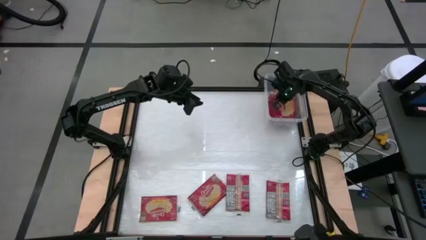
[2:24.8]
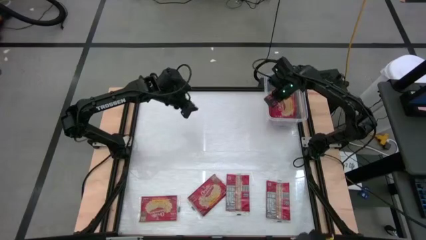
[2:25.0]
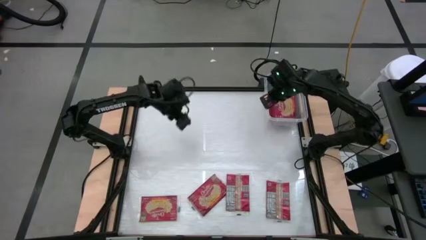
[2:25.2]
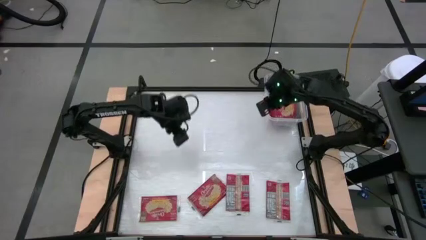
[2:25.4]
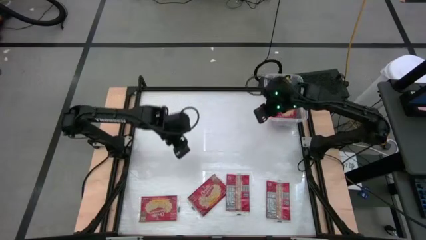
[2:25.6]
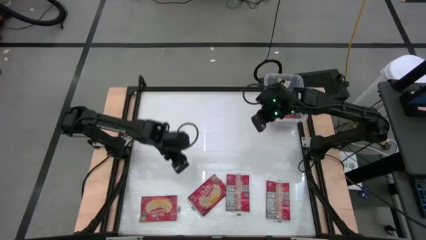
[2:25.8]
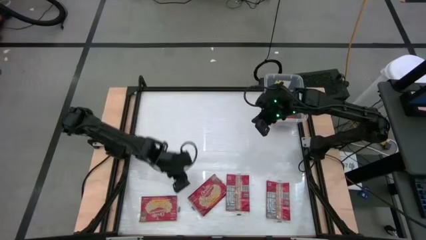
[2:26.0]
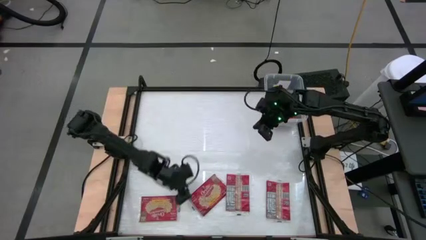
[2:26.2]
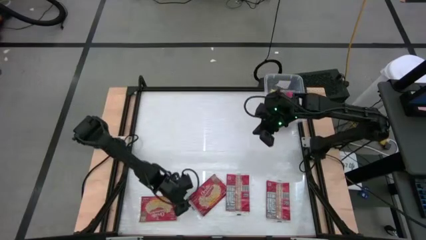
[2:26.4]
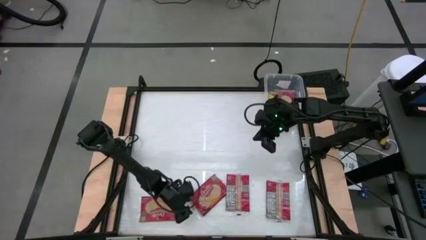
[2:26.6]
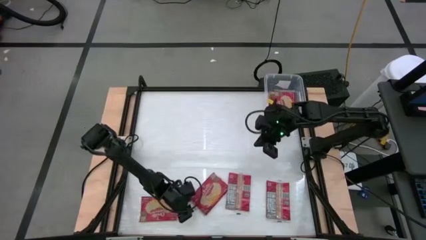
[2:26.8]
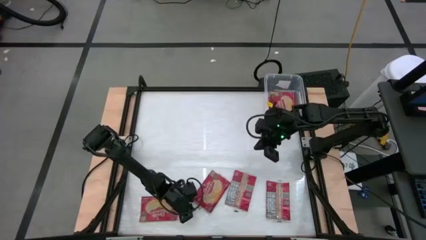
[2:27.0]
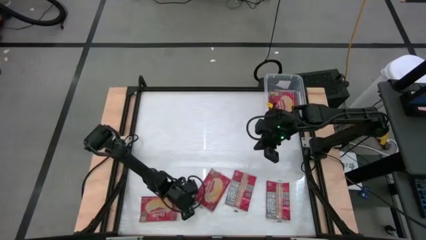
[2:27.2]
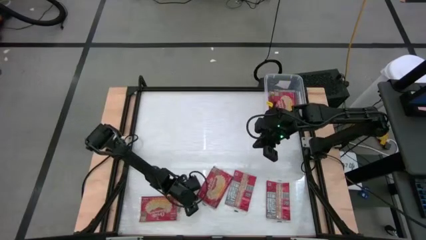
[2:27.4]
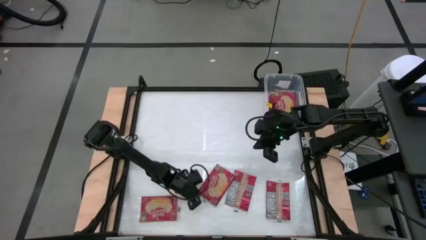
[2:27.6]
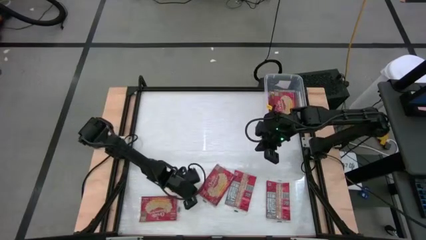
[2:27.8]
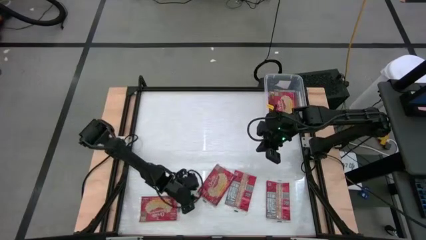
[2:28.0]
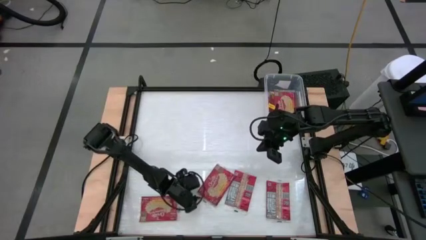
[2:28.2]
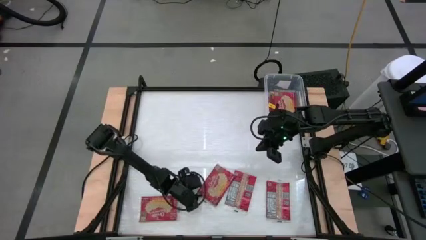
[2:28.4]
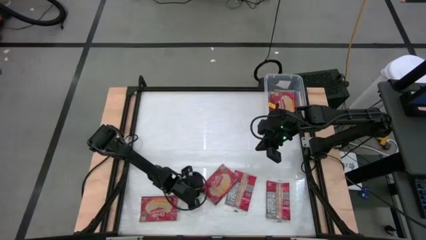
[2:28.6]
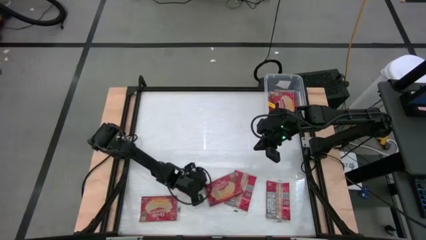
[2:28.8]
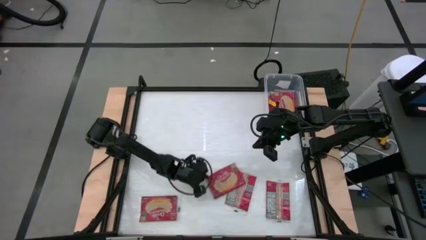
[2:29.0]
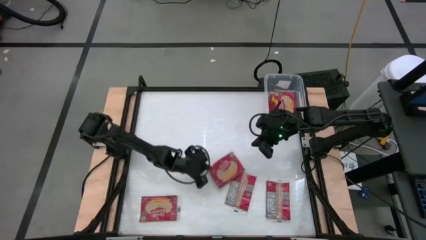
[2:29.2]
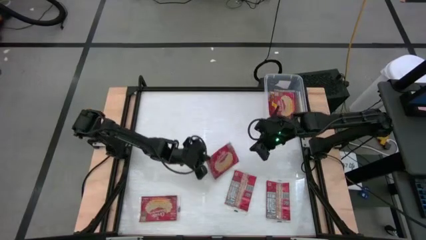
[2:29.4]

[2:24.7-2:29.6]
Task: Sort popcorn bags into baskets
Put the red popcorn bag into the transparent container

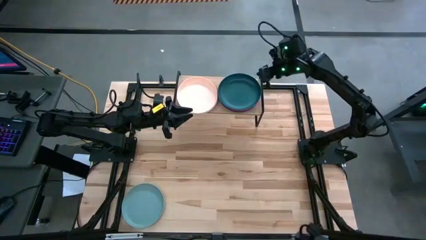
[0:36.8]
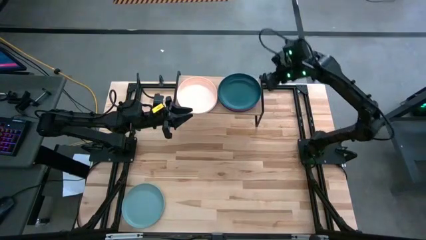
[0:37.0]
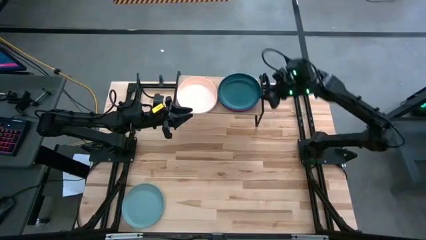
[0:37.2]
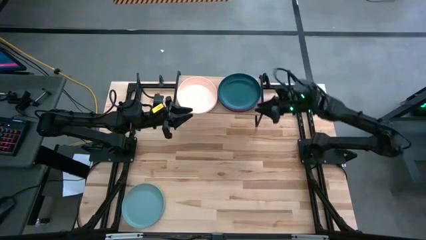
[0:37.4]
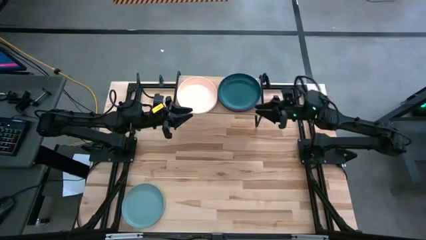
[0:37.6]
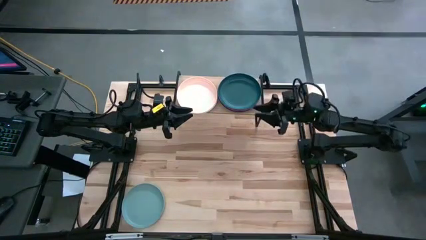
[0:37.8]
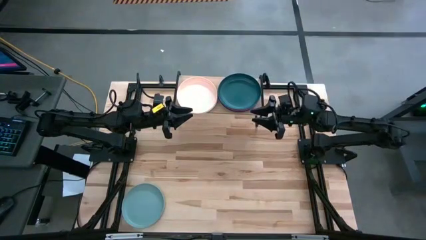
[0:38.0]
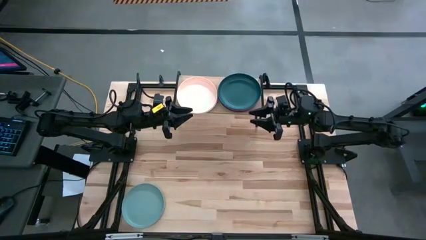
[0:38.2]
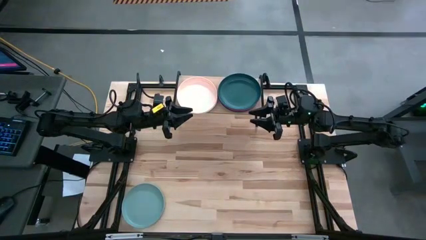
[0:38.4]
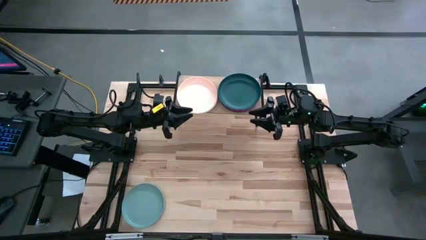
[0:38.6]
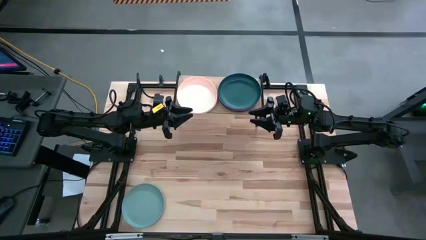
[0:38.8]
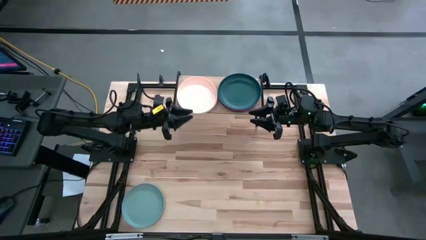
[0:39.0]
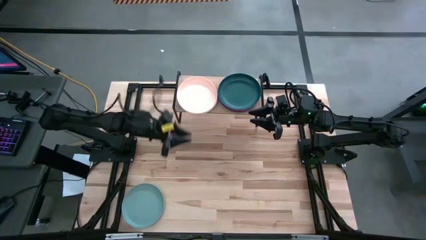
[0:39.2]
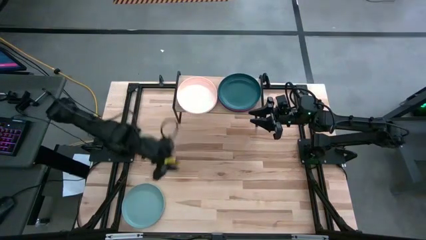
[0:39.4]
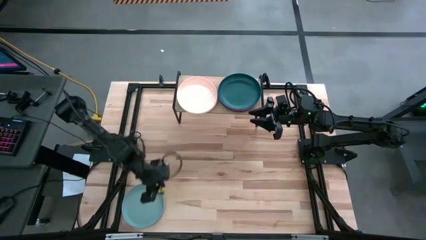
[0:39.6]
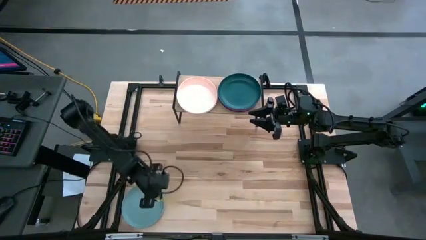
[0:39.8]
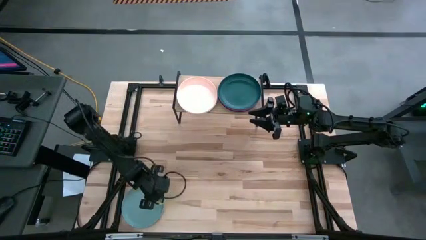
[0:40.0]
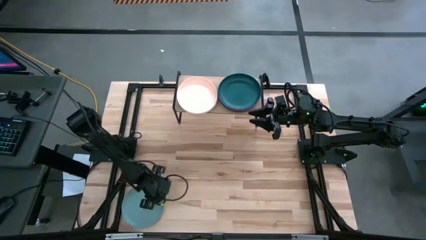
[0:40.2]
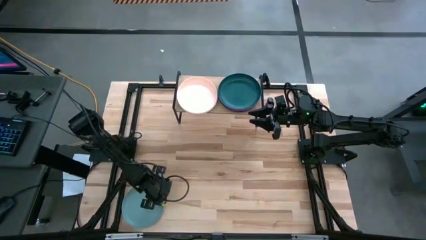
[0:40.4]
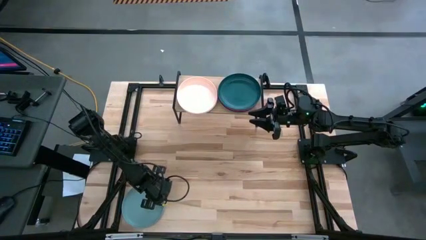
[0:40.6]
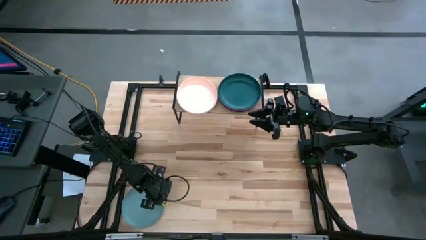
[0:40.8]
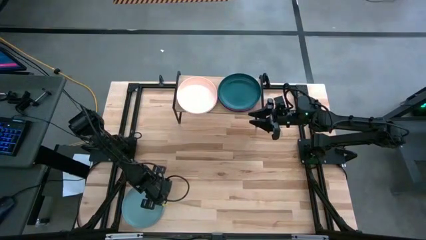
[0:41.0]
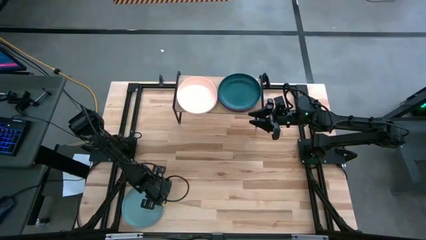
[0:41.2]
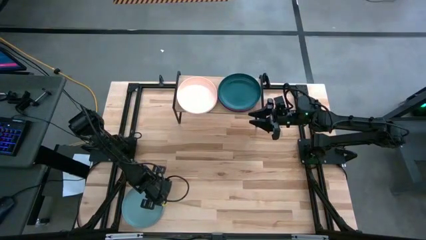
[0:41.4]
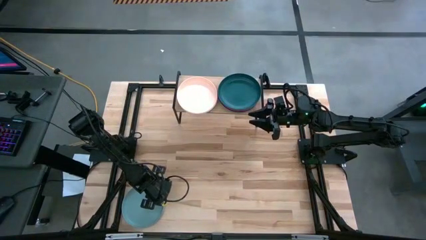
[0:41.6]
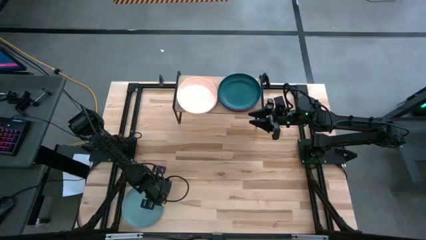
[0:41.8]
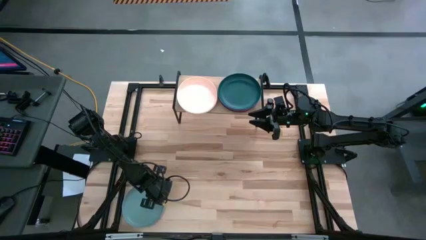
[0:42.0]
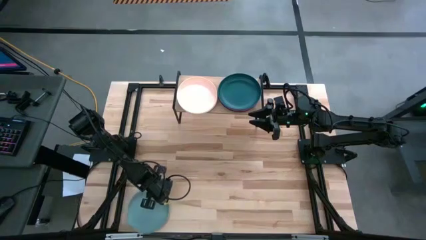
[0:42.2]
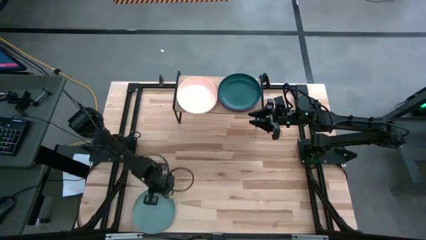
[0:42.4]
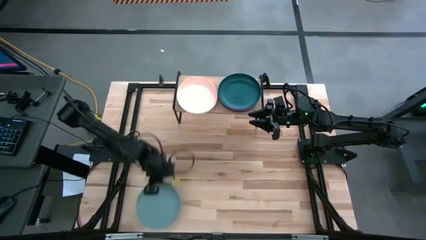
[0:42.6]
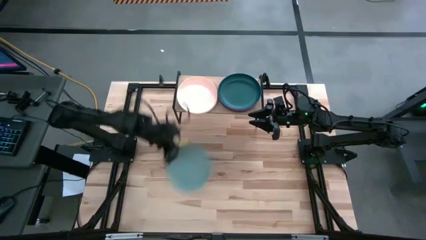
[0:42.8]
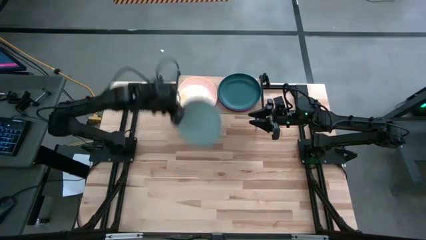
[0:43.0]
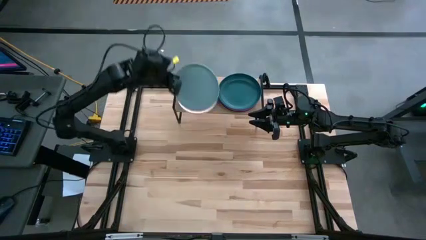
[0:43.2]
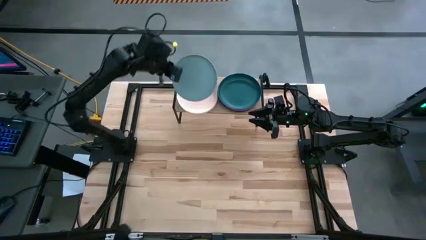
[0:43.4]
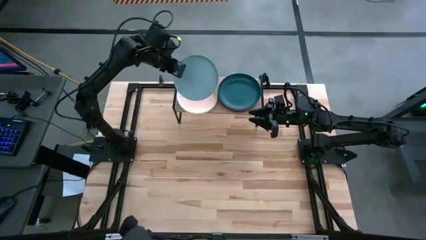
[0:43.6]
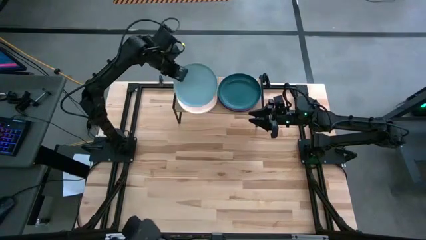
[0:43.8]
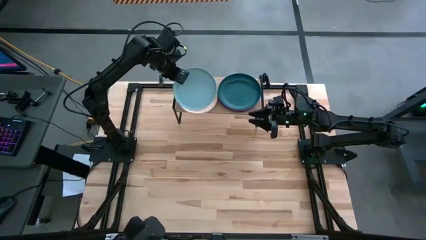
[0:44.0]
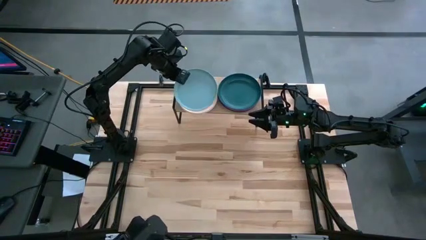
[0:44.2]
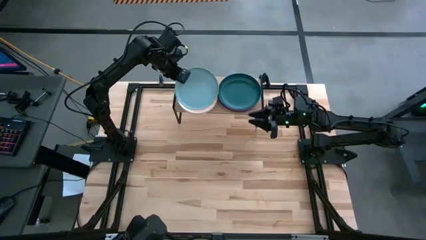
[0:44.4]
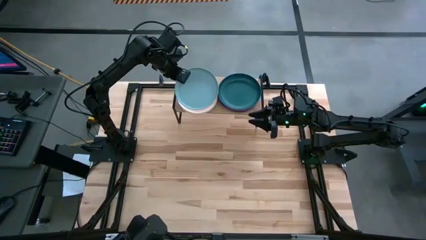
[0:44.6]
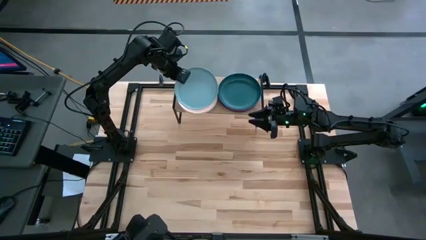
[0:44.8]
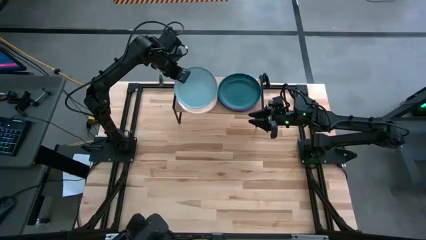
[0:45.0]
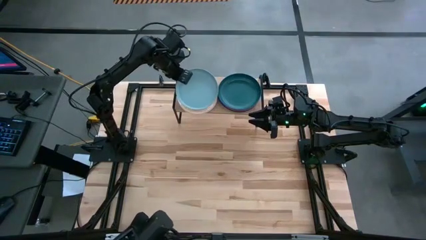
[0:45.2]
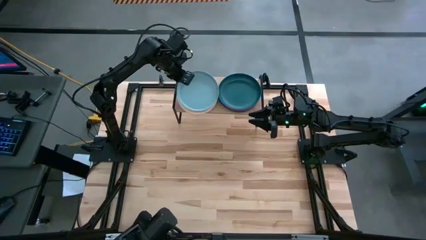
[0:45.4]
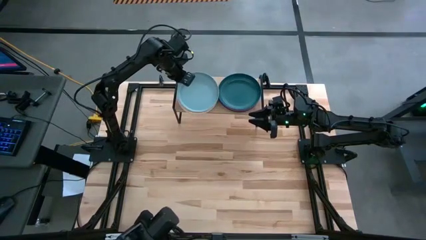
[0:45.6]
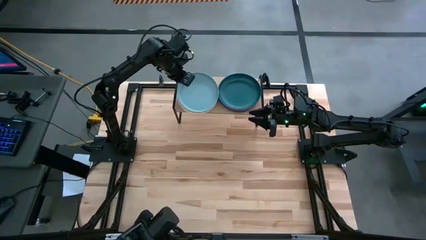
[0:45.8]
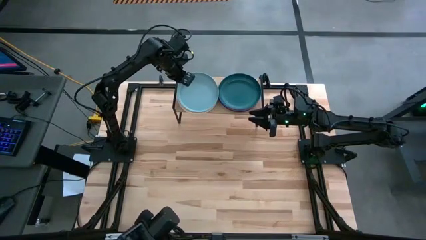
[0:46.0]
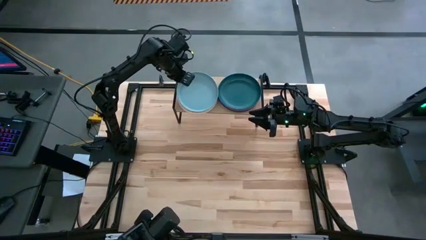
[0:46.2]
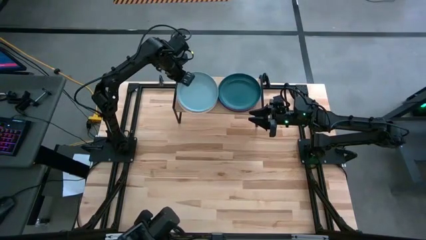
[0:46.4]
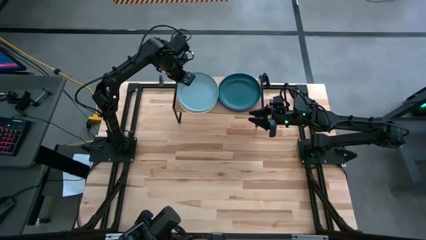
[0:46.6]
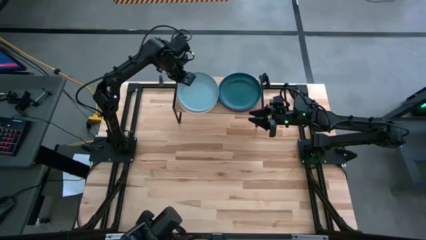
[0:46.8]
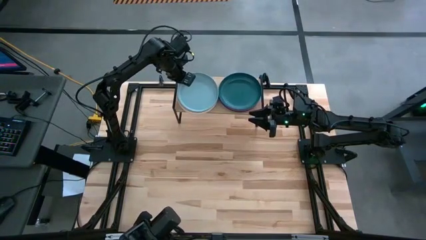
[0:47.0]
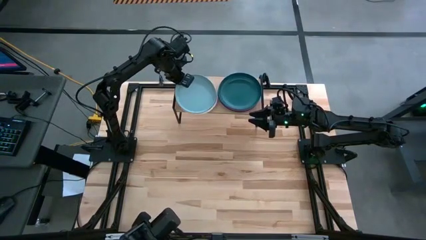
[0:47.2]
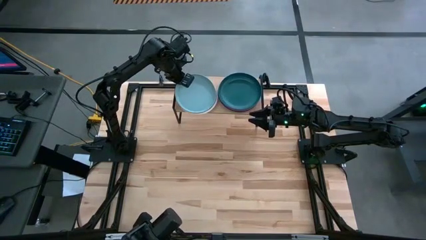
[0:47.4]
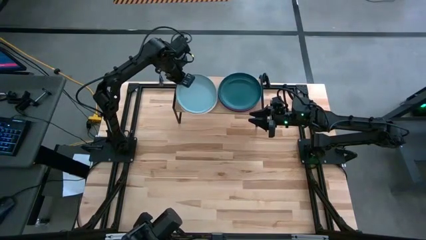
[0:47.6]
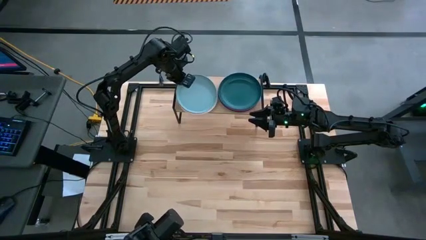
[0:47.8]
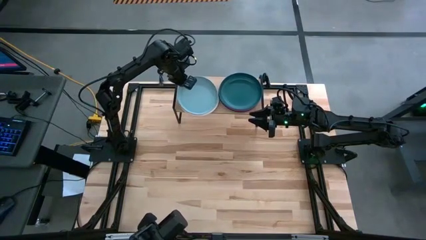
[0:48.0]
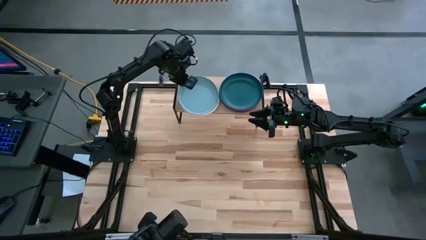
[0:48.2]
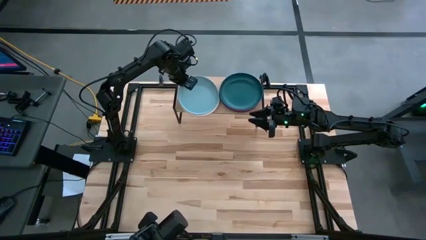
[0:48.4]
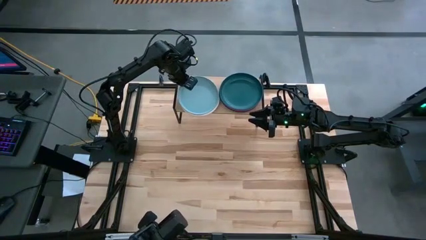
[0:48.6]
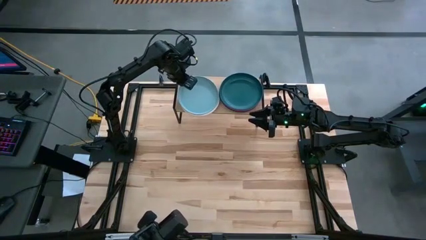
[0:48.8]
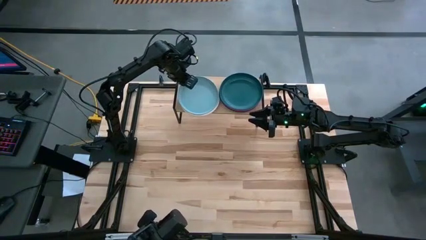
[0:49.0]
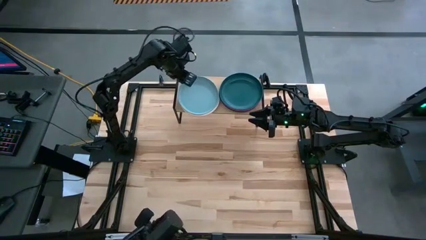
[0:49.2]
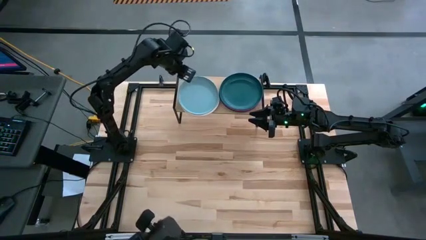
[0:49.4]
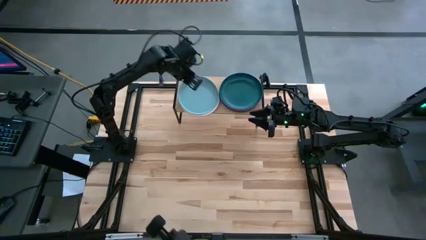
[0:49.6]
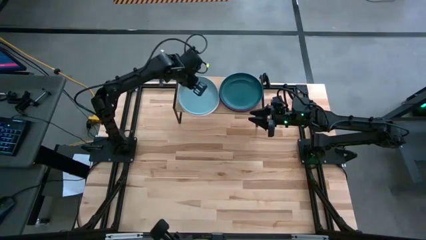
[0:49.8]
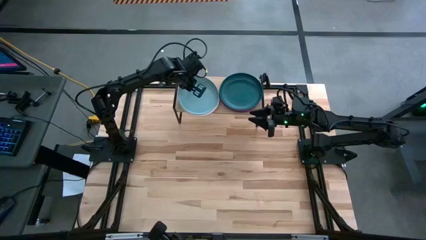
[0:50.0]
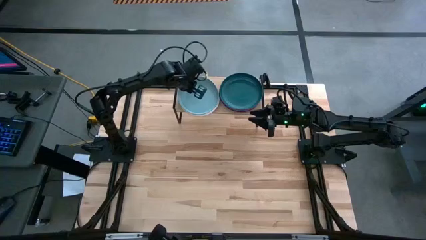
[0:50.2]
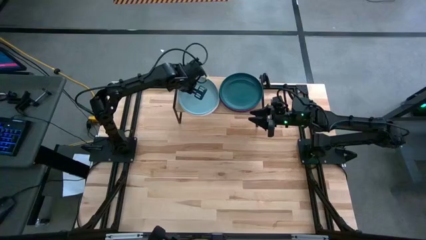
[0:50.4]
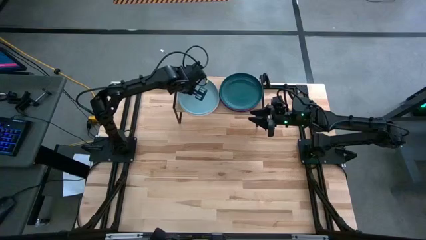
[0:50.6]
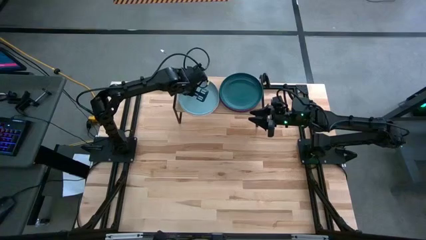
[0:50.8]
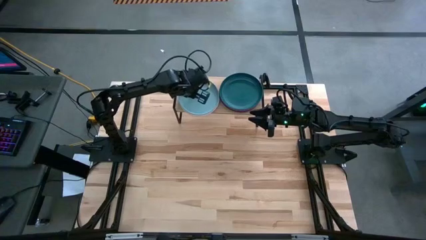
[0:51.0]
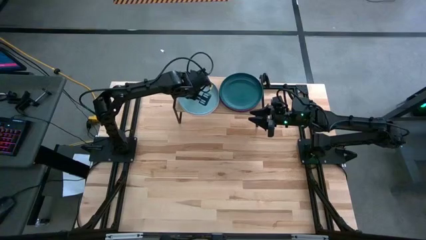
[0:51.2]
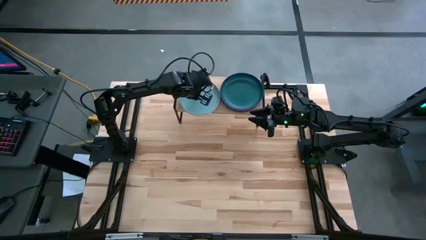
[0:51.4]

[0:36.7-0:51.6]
Task: Place and stack plates onto a shelf
Stack the blue plate on top of the peach plate on the shelf
